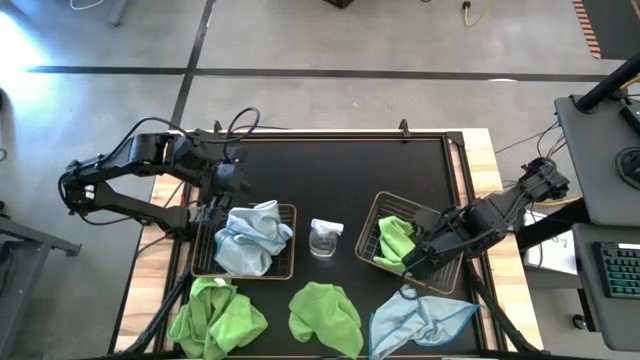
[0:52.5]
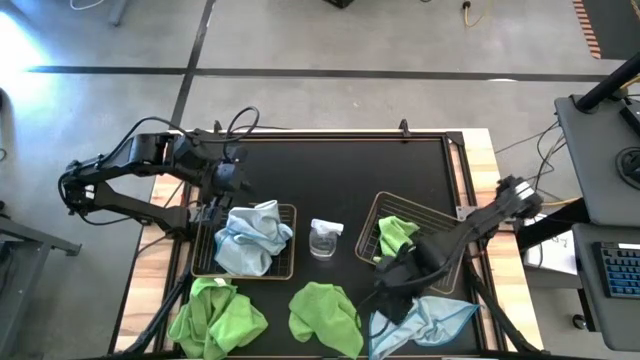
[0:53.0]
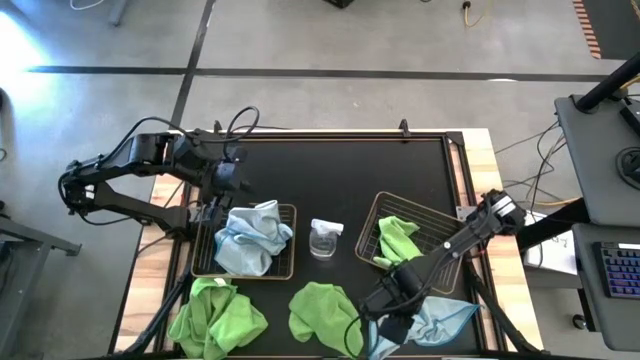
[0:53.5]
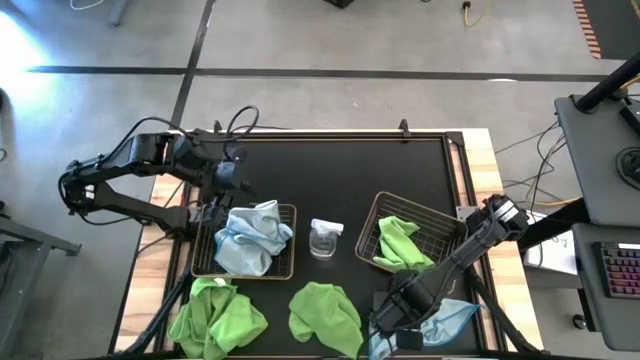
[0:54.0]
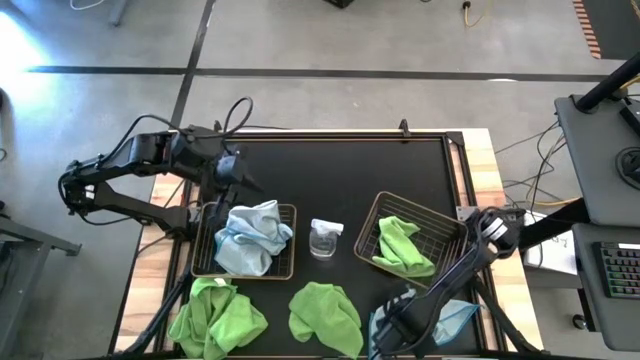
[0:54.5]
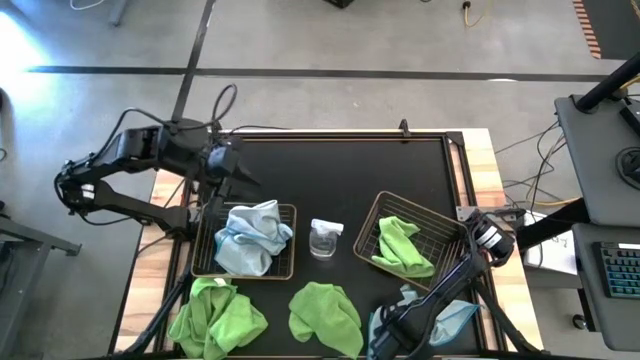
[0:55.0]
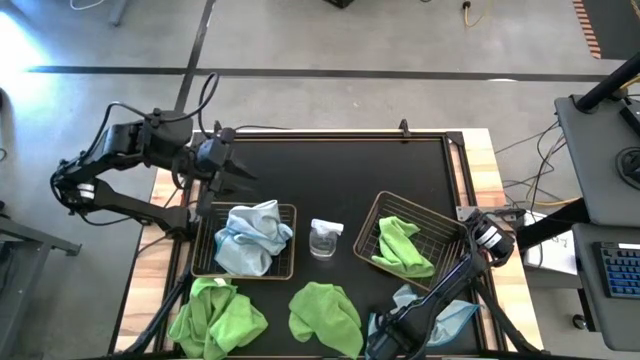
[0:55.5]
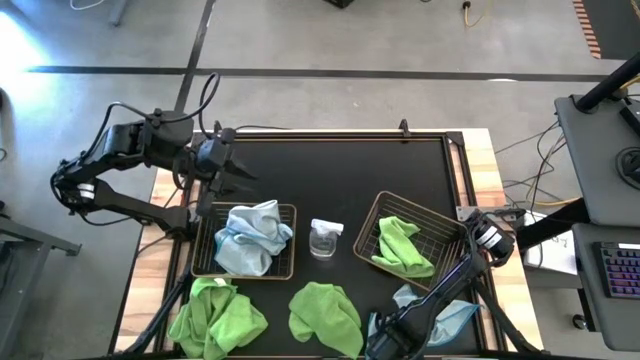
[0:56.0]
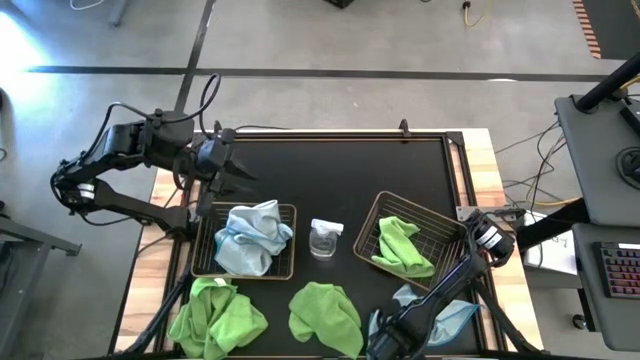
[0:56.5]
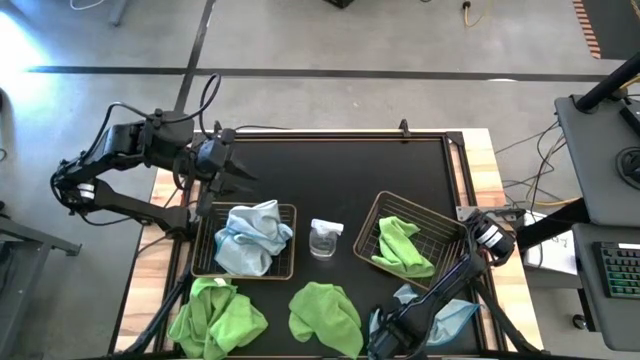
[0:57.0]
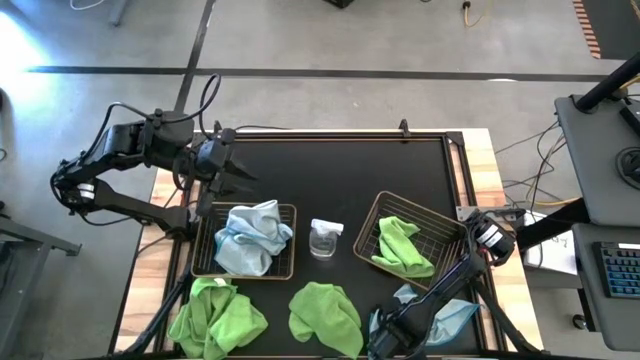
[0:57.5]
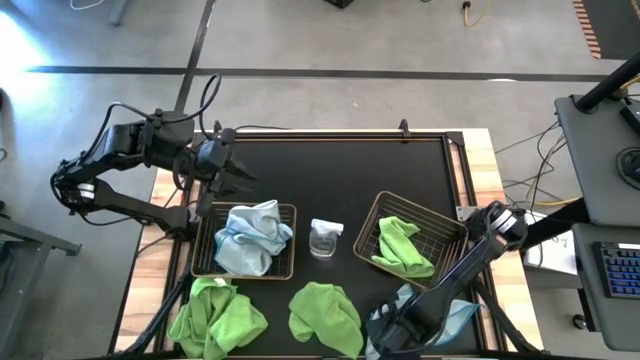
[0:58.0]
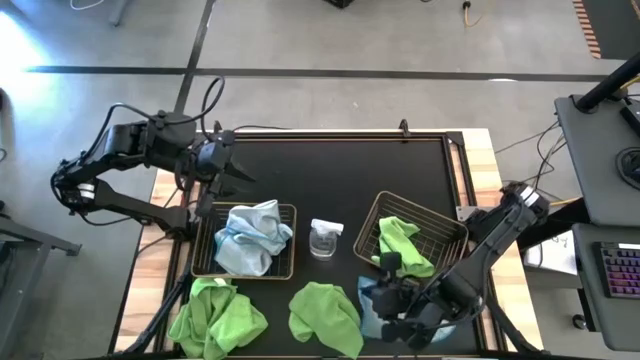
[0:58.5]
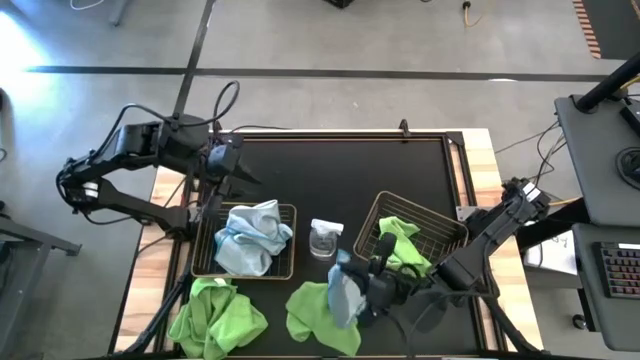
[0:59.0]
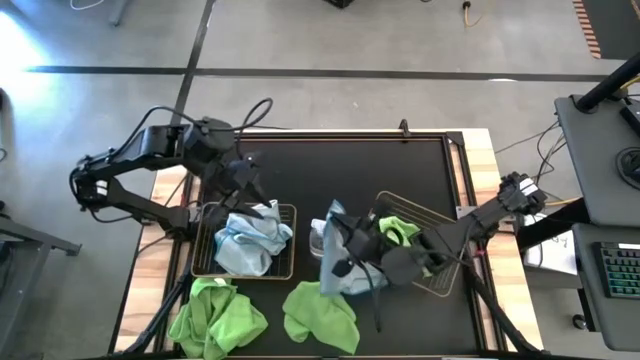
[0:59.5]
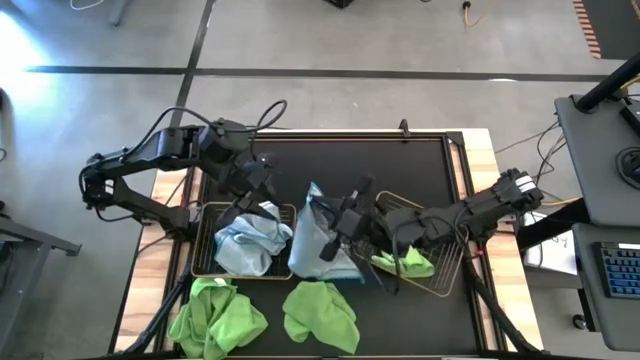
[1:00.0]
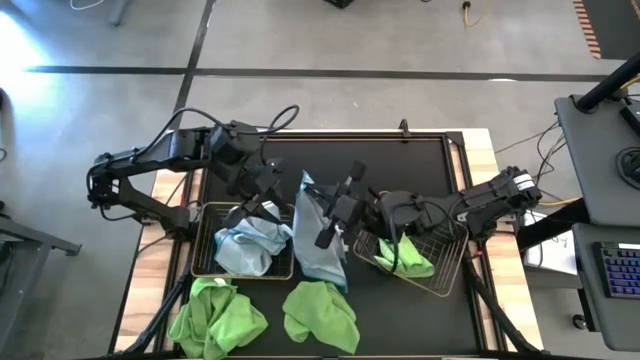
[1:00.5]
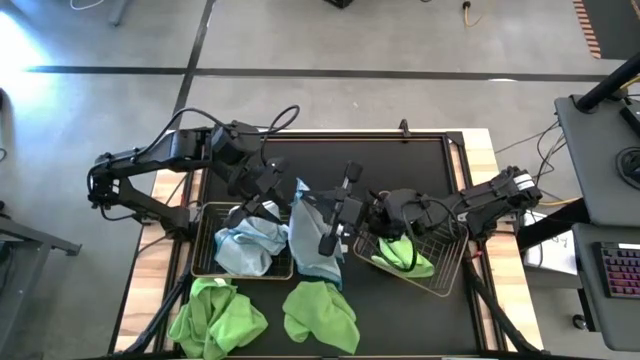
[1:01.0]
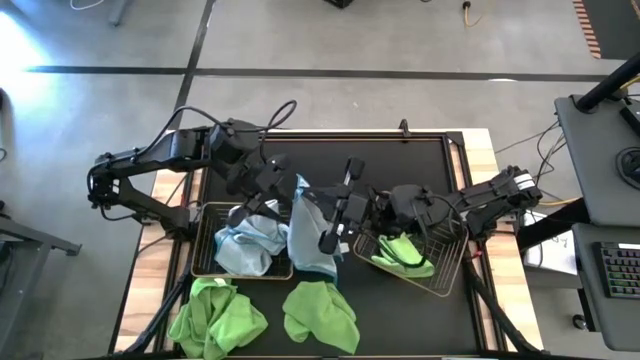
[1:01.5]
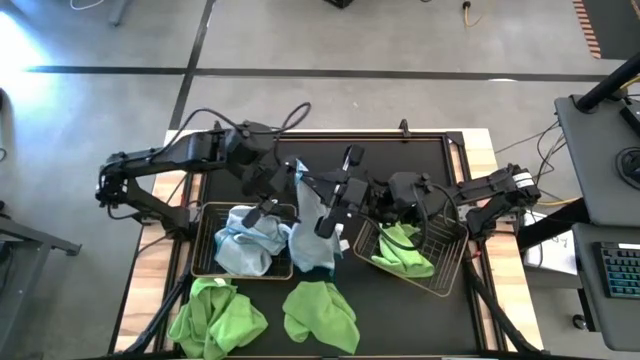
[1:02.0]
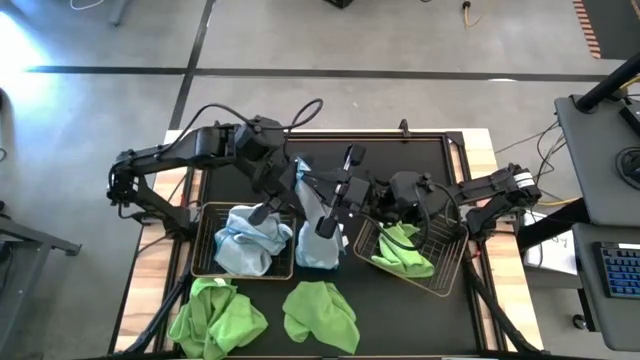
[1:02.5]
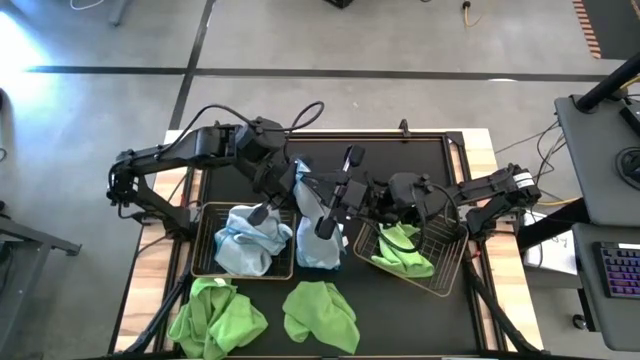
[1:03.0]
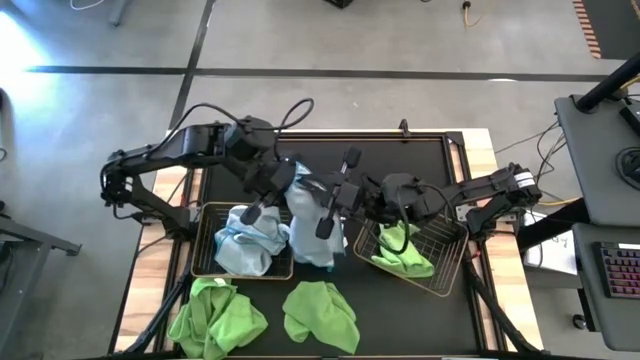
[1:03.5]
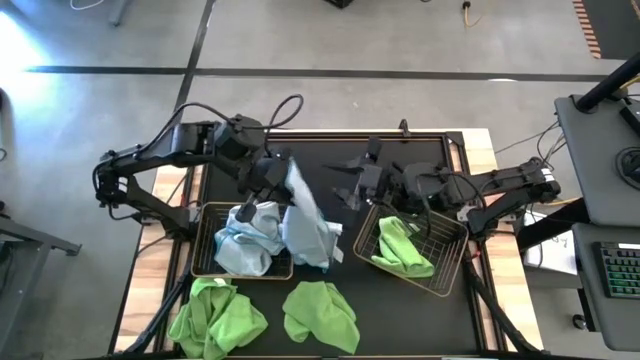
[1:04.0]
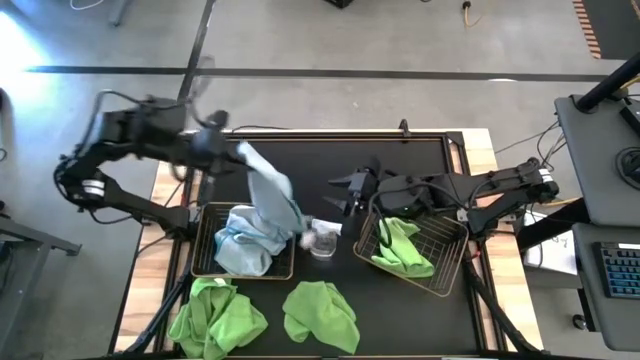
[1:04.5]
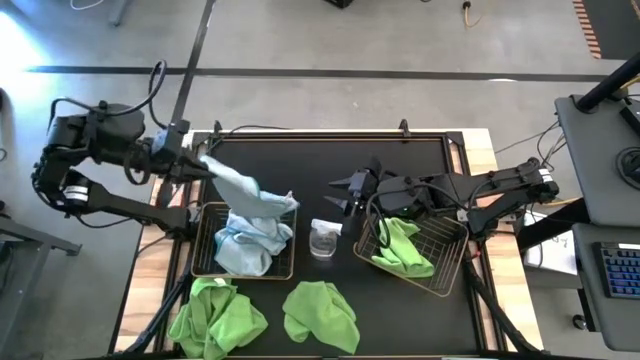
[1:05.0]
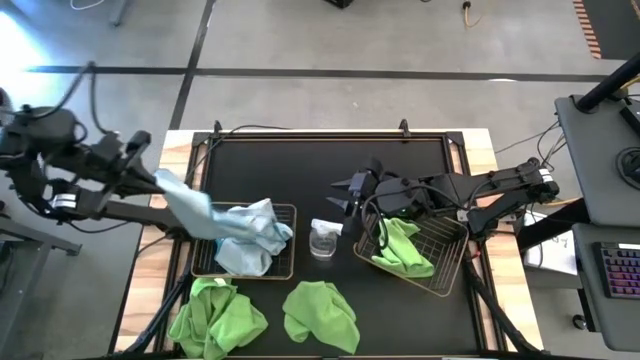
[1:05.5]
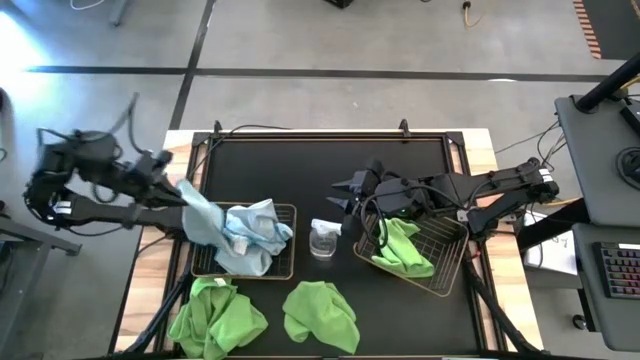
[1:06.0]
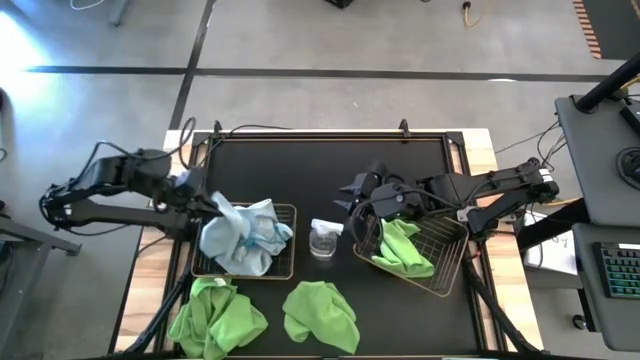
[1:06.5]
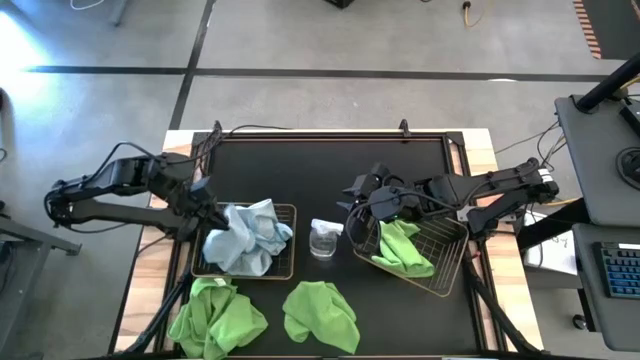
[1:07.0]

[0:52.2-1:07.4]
Task: Sort microfiber towel by color & place in baskets
Put the blue microfiber towel into the left wire basket

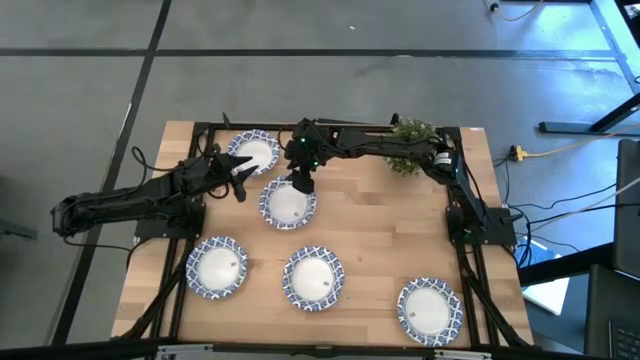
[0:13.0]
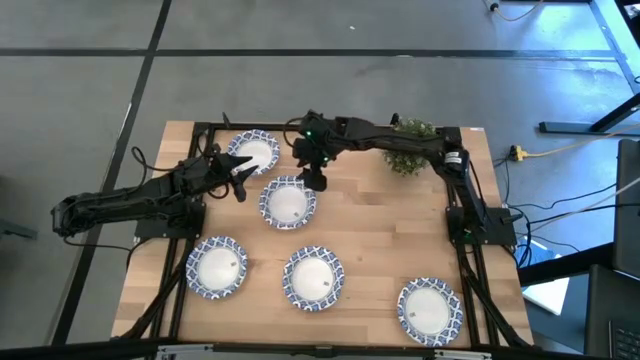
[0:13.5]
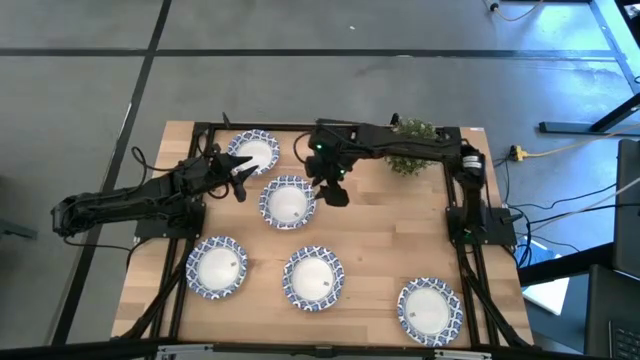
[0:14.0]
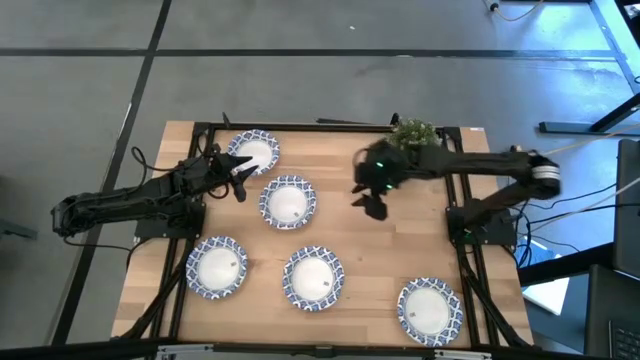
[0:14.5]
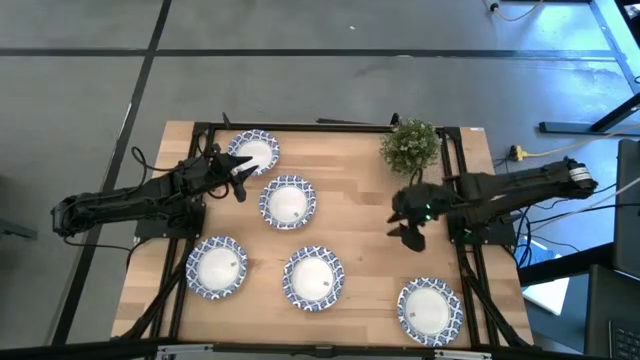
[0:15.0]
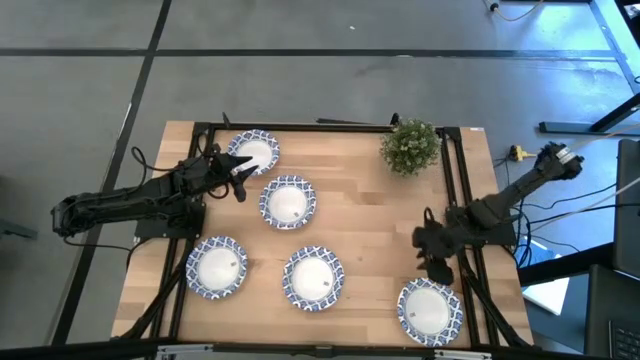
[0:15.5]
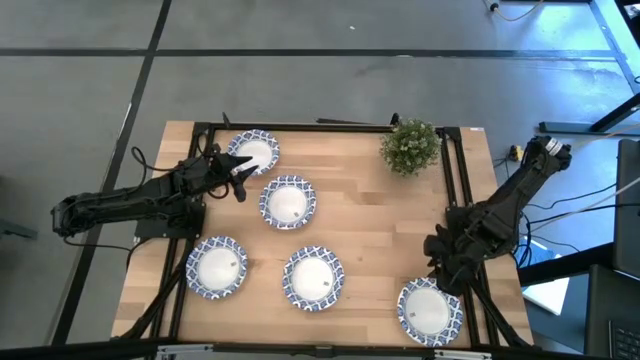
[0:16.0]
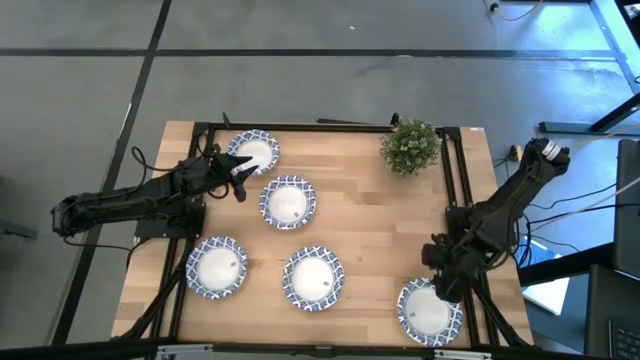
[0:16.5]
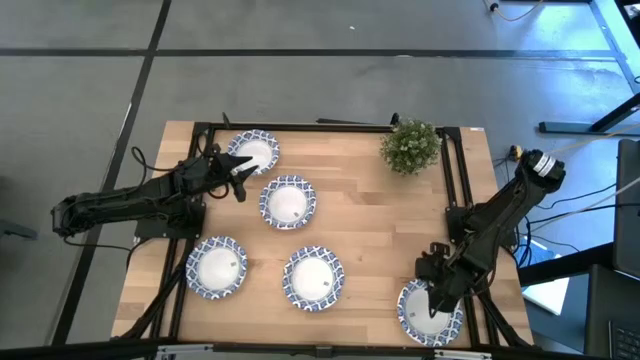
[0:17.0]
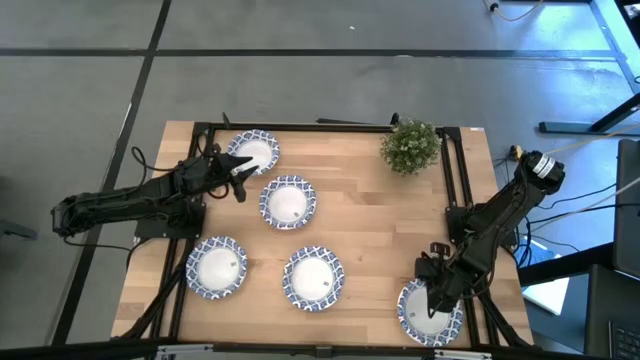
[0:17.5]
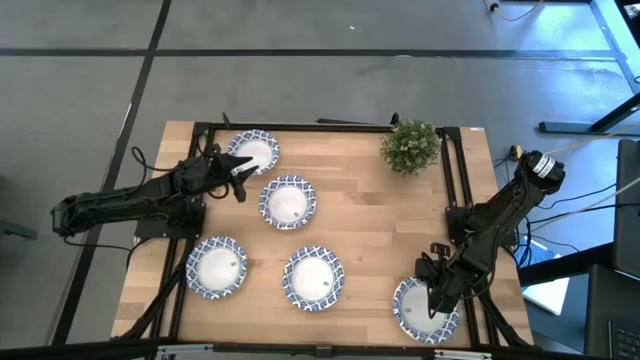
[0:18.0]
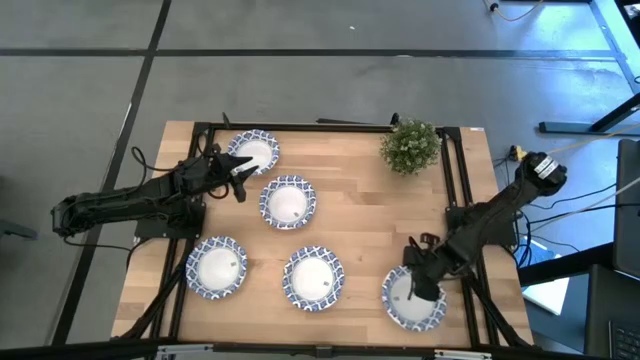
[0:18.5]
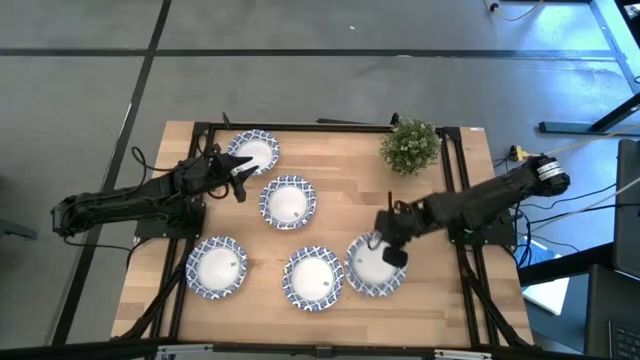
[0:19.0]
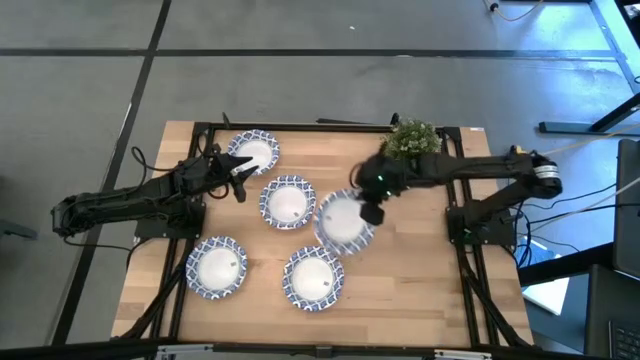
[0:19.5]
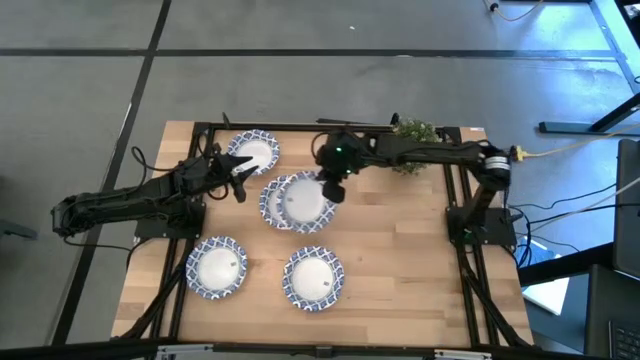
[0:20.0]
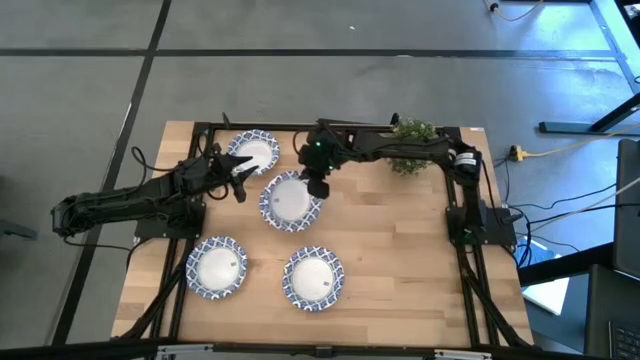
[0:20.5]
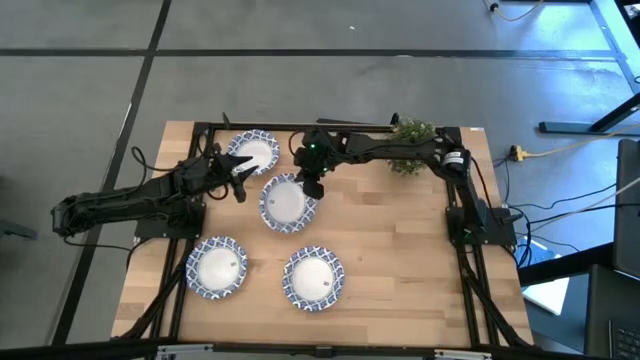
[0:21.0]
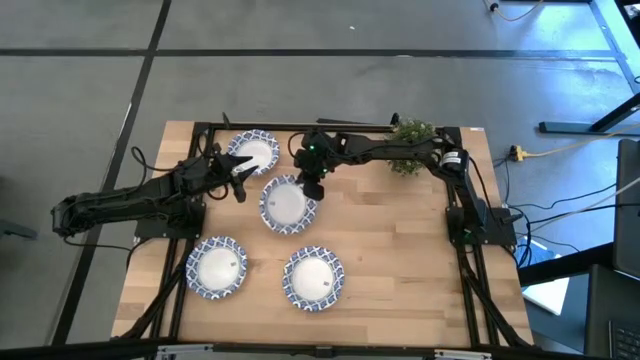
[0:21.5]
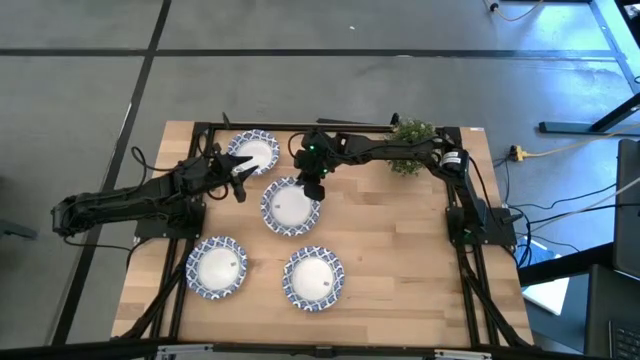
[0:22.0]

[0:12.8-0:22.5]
Task: Nest bowls inside each other
Stack the white patterned bowl on the other white patterned bowls
